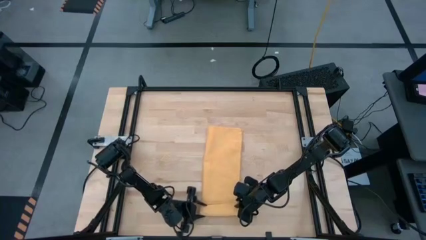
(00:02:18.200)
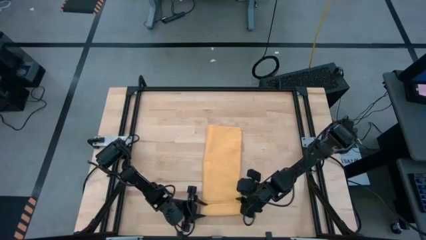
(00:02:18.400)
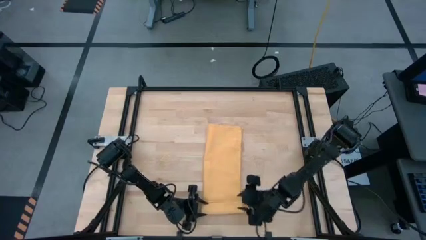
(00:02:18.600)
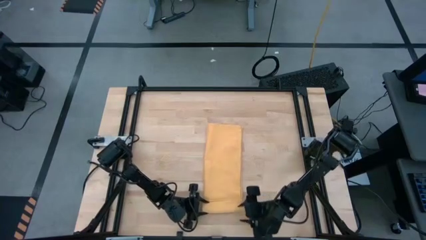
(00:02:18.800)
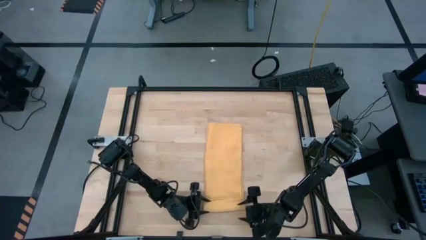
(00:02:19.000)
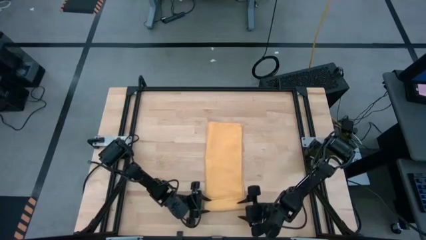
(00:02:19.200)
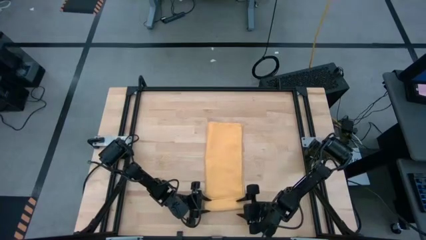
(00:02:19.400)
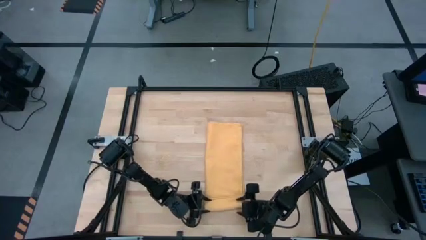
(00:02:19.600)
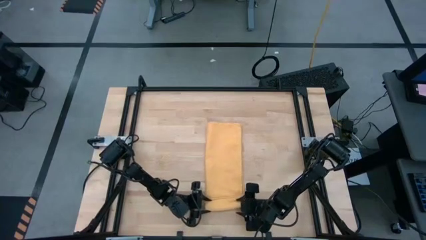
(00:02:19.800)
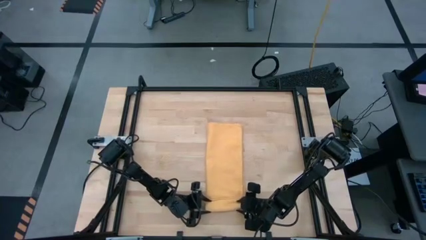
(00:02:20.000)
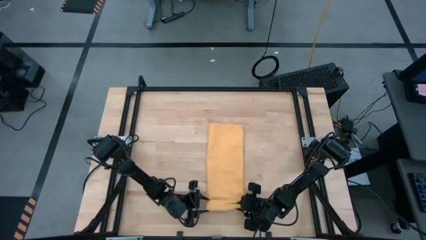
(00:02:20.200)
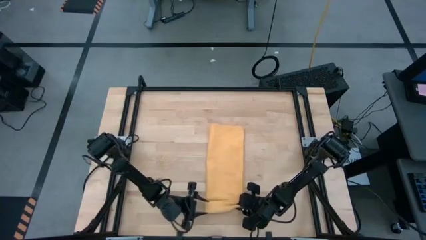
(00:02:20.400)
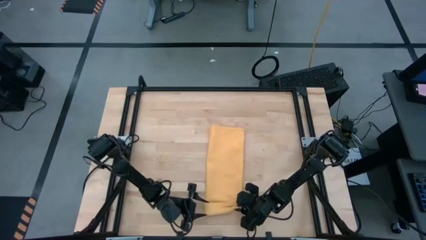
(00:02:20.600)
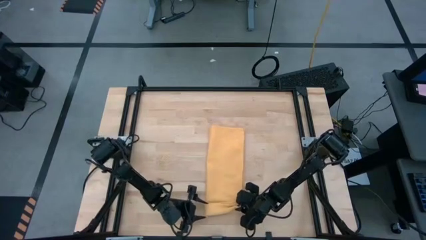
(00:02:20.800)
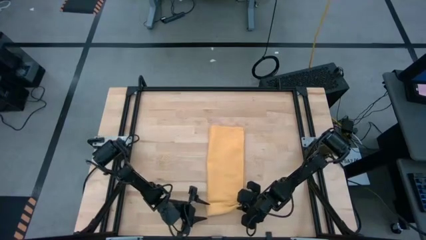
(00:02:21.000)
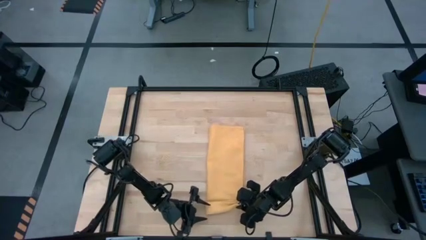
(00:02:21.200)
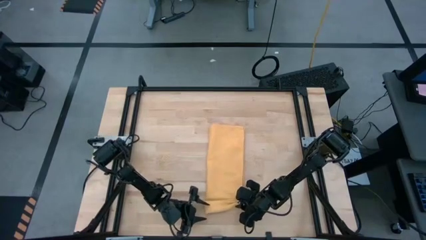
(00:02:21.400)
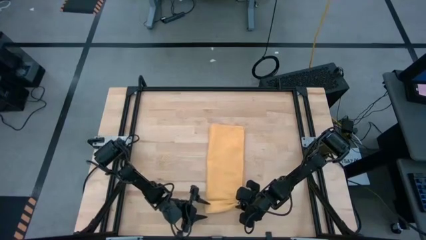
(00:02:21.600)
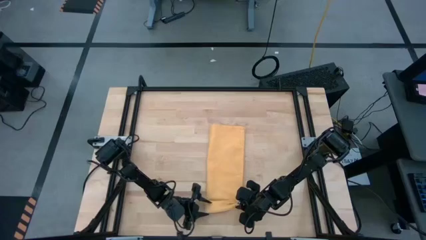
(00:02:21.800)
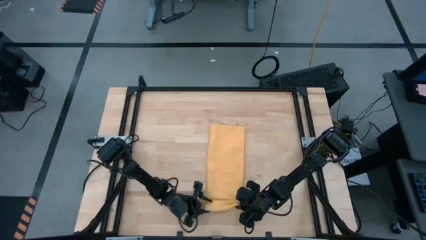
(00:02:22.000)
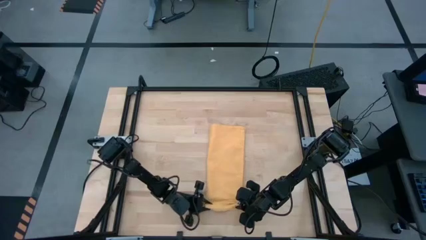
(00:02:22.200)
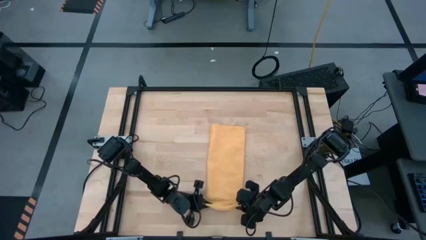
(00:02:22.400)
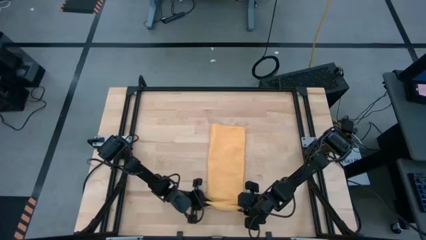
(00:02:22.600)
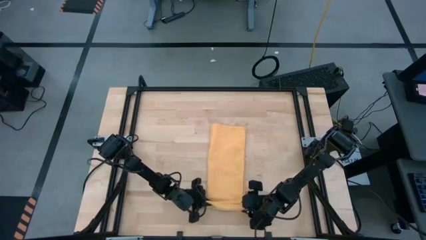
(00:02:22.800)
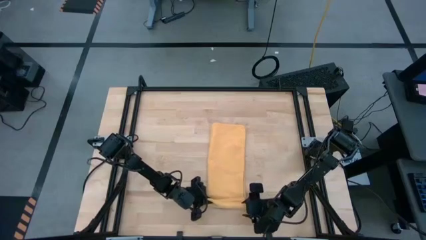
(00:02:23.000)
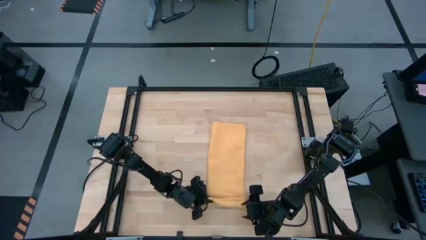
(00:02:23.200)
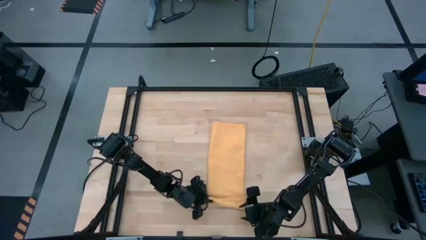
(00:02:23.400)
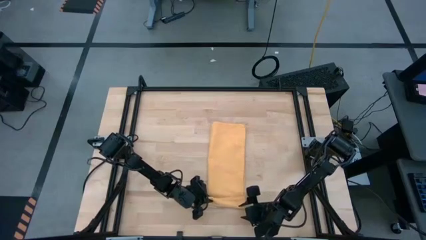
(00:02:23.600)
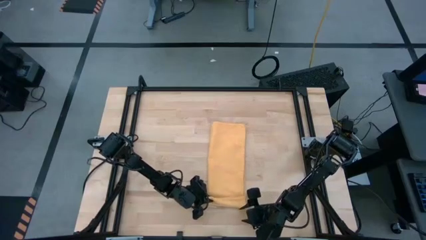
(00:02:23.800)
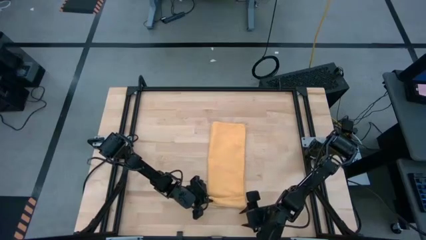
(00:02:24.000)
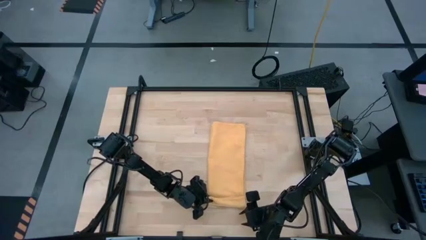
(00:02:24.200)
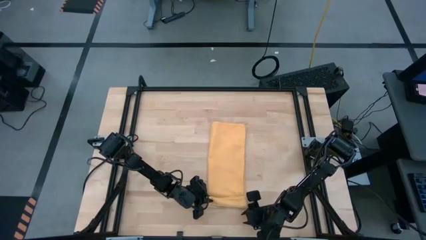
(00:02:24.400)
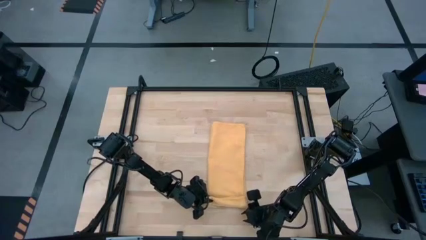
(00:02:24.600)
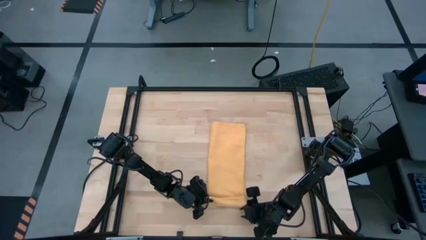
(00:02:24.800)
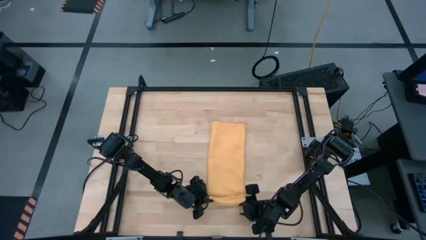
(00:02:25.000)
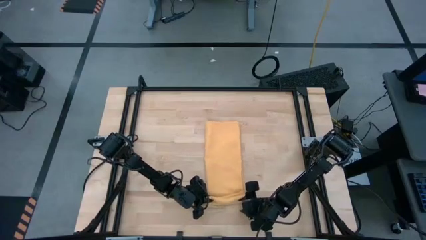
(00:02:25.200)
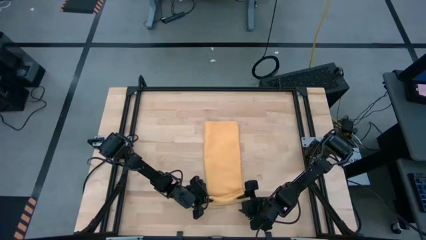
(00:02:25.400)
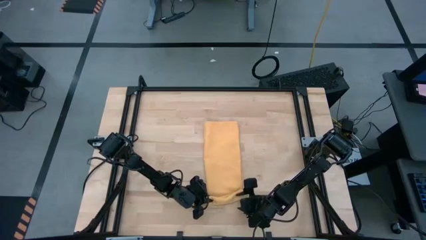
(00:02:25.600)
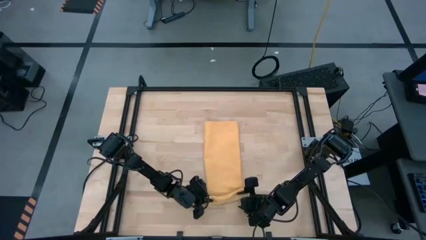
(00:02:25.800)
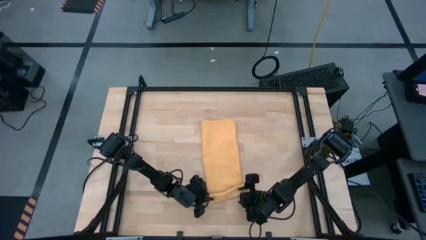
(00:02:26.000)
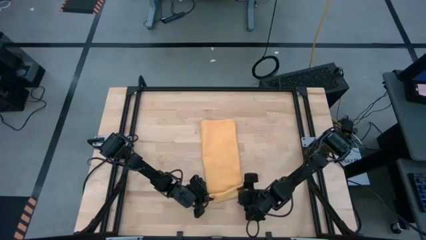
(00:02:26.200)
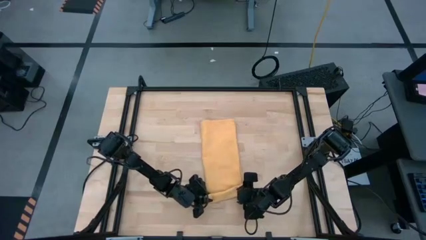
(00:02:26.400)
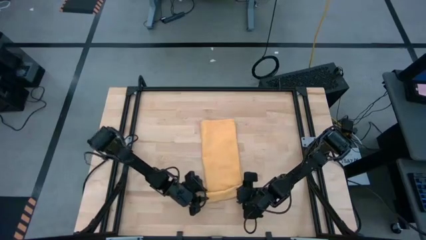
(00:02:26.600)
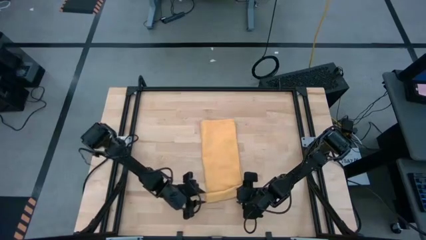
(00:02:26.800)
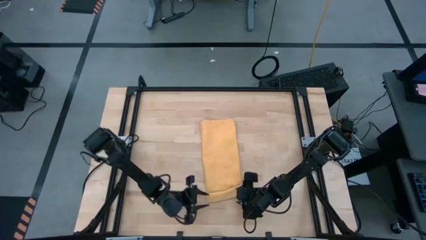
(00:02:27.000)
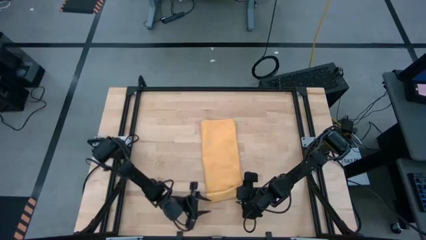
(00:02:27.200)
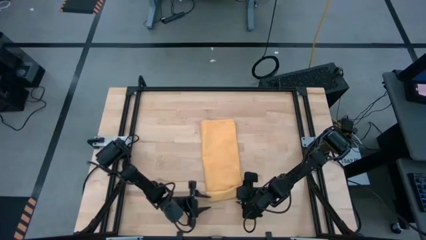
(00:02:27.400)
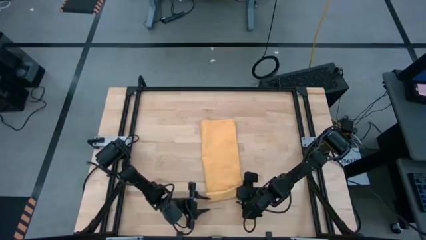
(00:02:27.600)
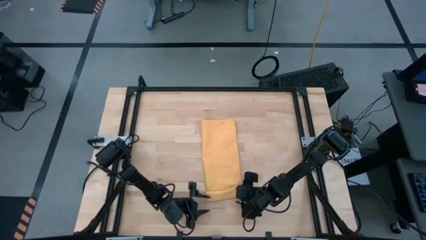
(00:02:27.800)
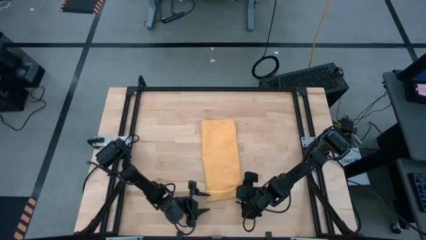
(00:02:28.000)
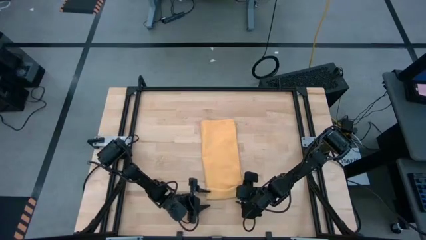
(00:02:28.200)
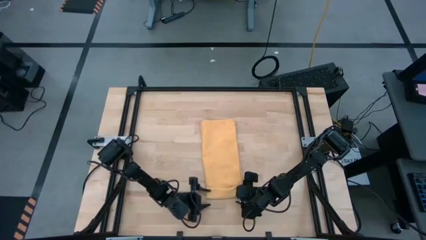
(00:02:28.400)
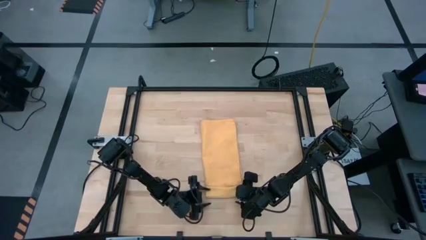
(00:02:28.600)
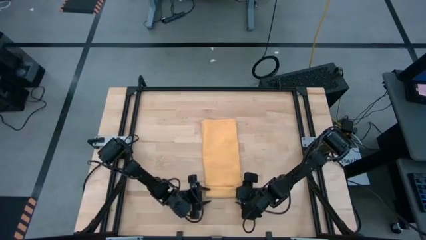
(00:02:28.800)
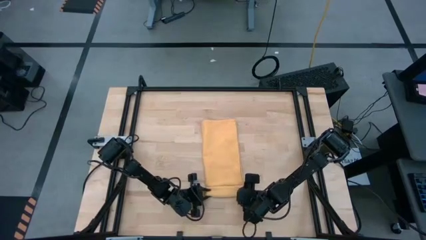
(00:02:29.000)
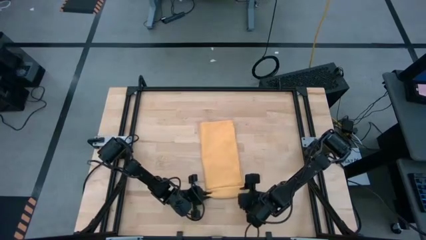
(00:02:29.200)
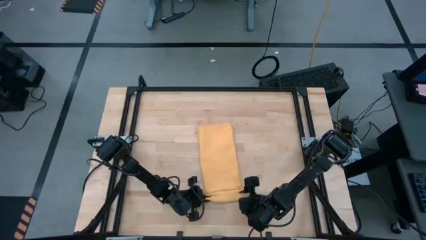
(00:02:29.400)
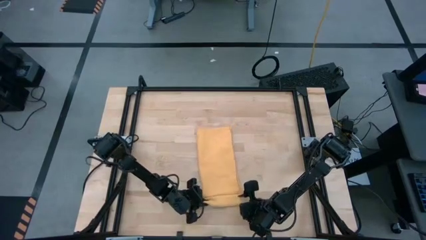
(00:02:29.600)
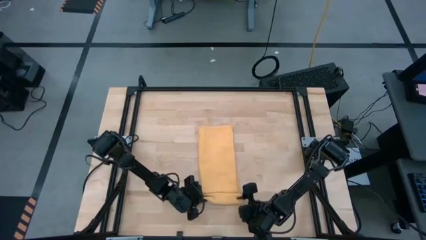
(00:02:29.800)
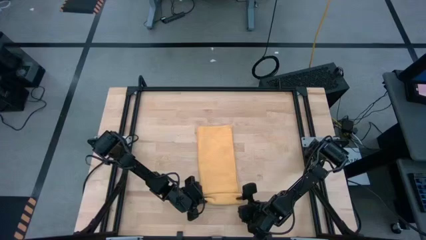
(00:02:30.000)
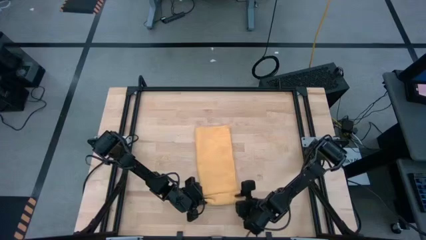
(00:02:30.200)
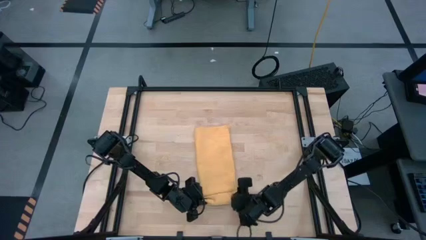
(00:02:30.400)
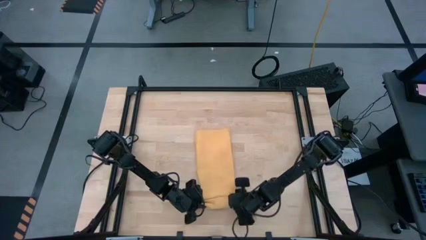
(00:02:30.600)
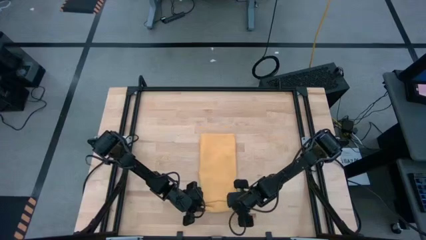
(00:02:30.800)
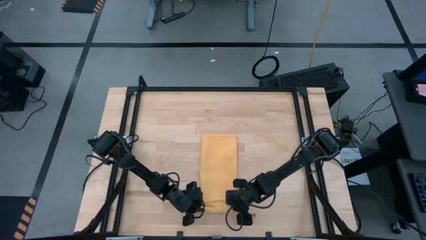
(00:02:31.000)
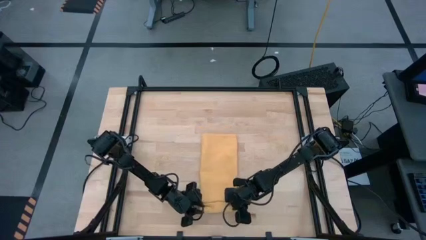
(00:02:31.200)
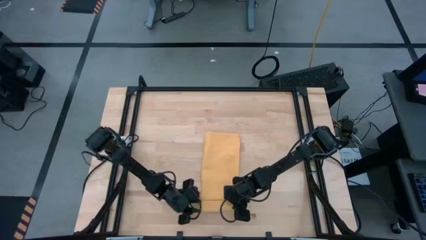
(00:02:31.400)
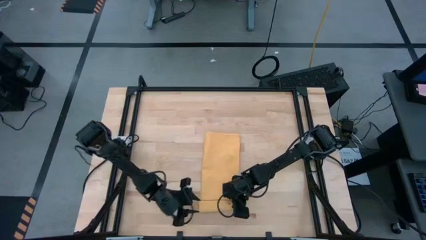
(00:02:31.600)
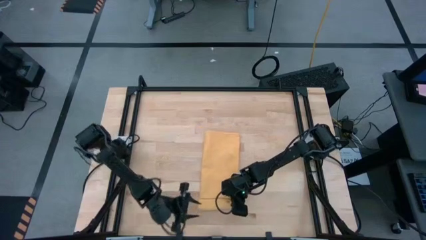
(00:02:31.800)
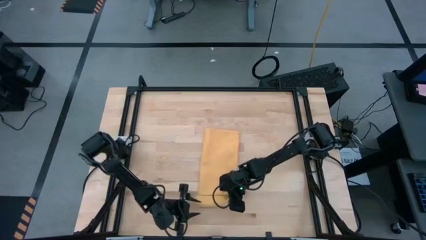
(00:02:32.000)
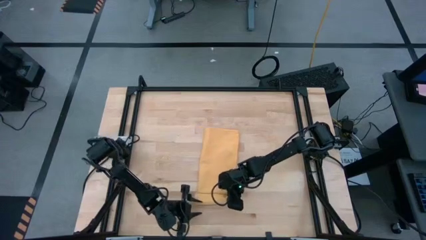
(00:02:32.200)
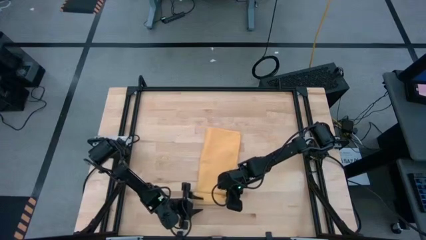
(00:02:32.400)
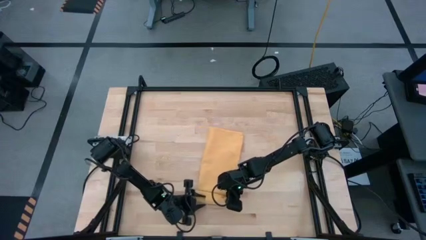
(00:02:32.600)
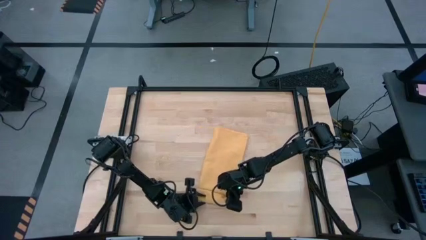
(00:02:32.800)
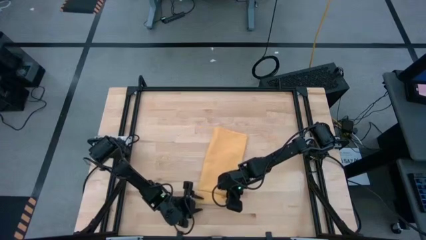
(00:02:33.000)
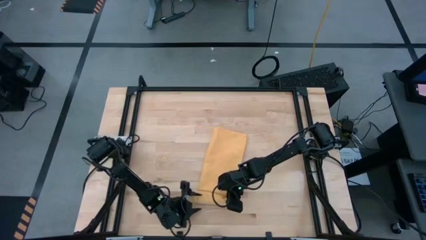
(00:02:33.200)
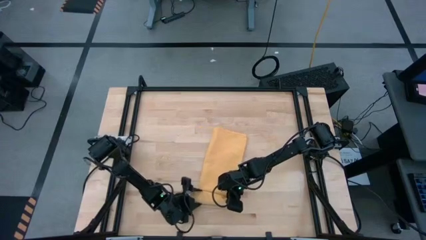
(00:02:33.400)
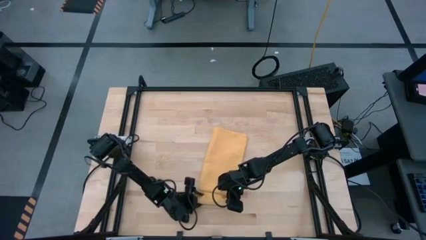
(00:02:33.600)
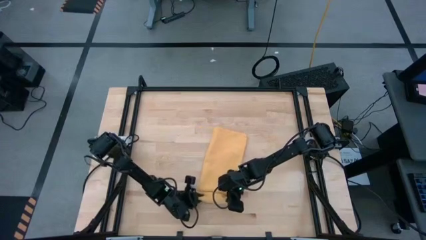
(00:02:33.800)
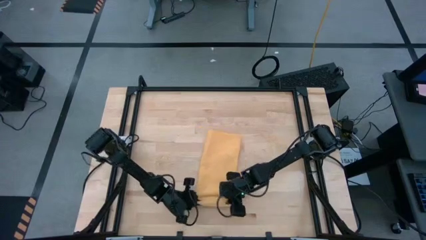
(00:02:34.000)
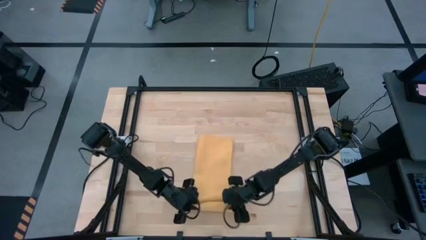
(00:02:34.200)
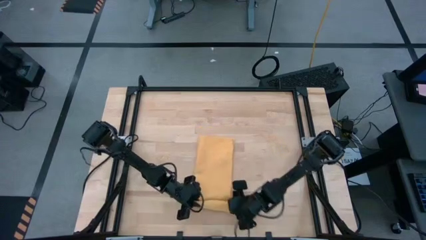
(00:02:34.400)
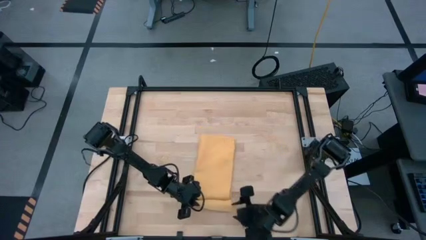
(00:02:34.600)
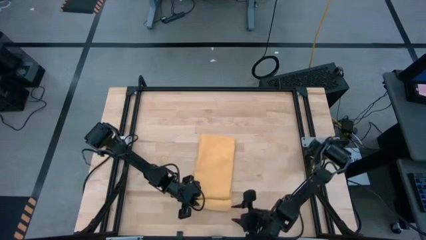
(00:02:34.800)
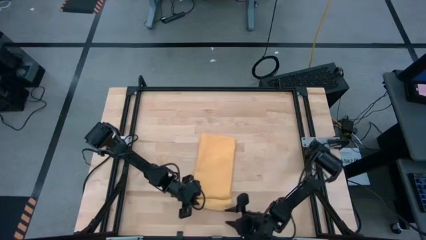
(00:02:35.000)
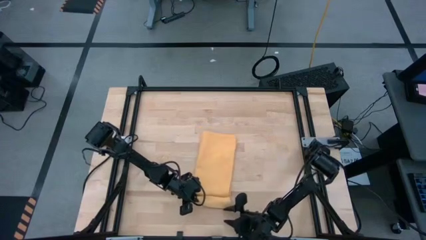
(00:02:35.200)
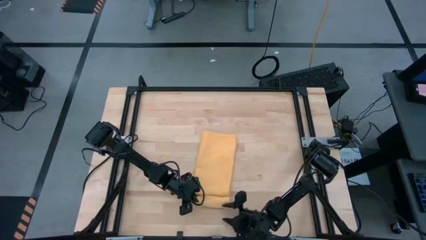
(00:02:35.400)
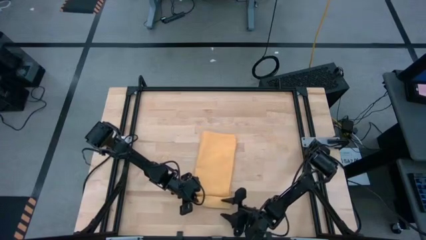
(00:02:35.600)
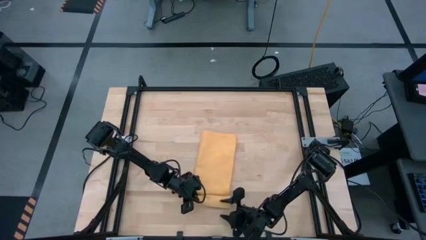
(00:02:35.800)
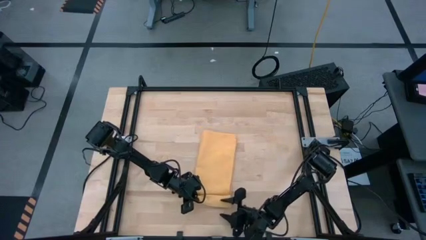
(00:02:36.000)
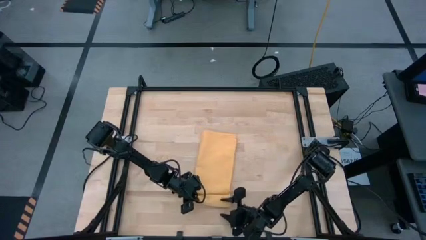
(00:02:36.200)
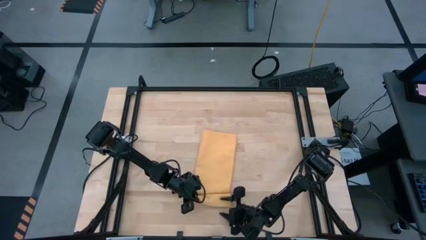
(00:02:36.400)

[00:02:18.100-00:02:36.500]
Task: Roll towel
Roll the yellow towel
